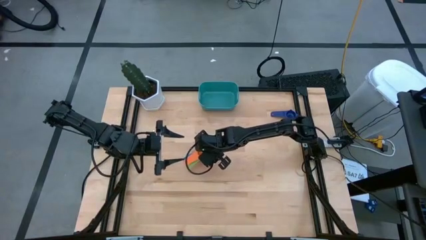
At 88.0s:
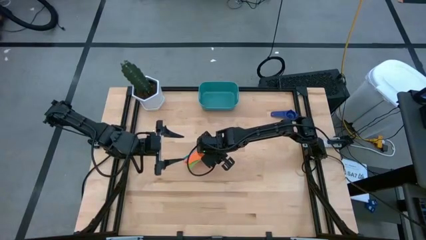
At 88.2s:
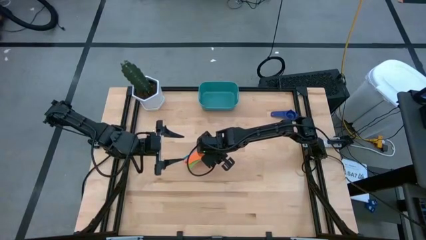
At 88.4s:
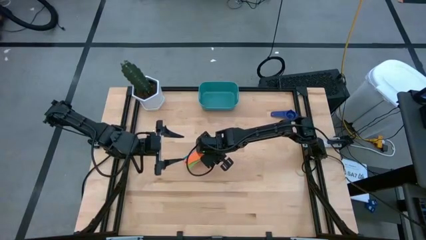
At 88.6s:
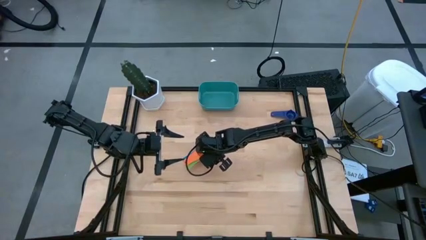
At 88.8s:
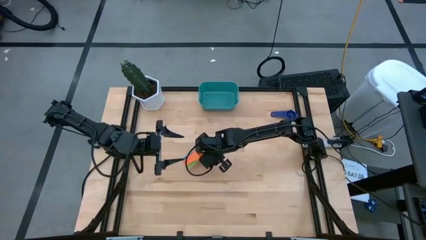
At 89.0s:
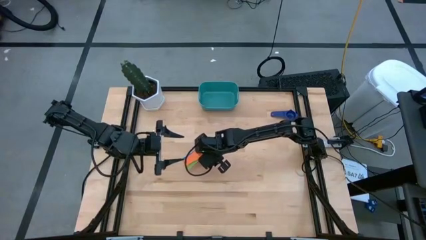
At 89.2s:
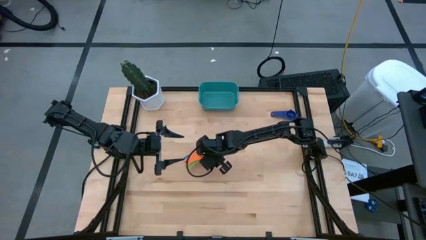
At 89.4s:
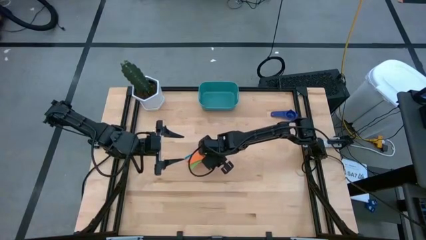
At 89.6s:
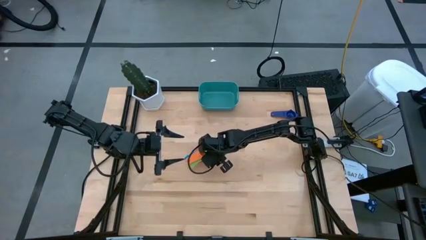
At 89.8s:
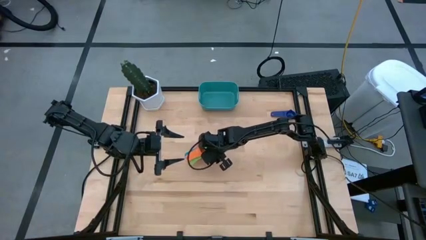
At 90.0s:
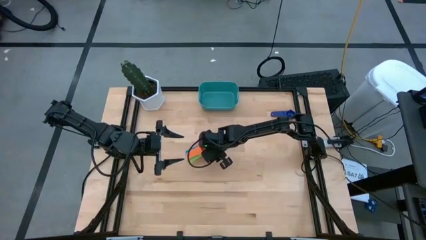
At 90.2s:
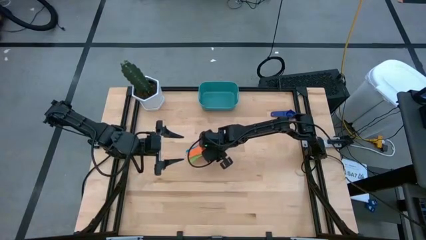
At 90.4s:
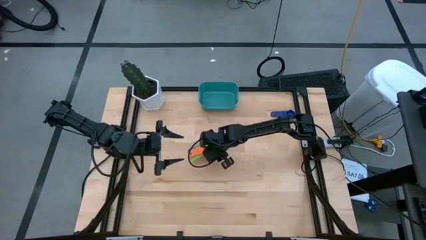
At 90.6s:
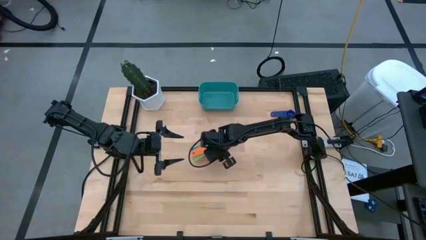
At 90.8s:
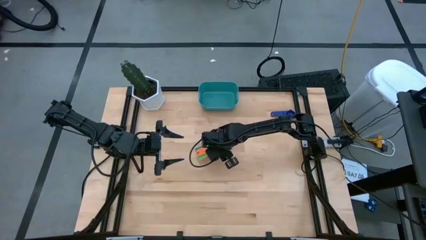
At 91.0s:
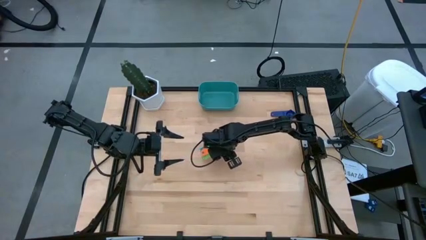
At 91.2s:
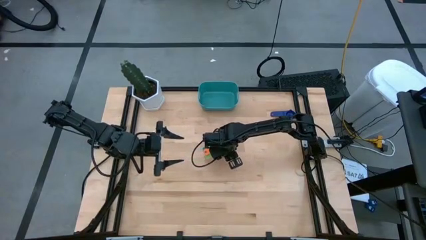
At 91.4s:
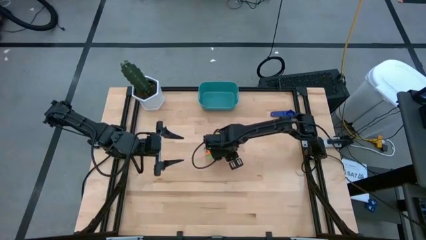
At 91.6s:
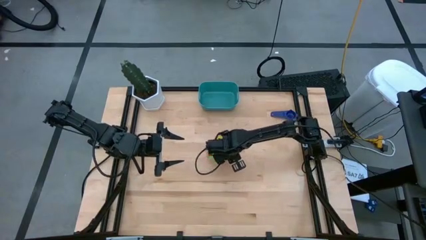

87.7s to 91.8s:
Task: Nest measuring cups in basket
Move the stacked measuring cups slightly right on the table

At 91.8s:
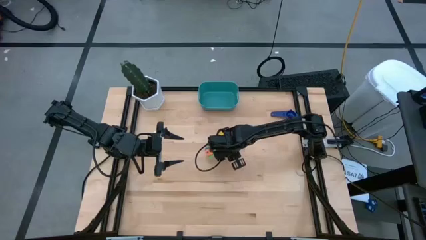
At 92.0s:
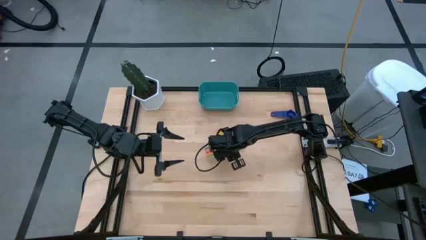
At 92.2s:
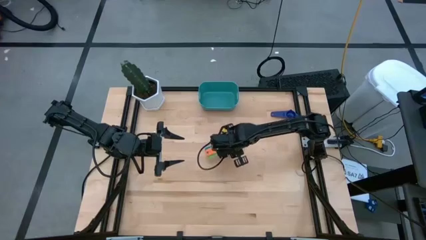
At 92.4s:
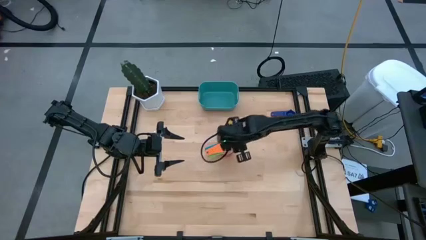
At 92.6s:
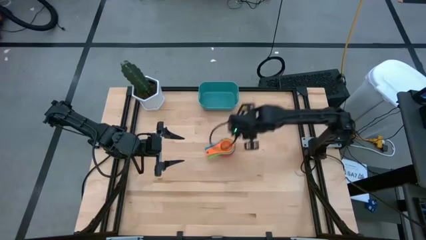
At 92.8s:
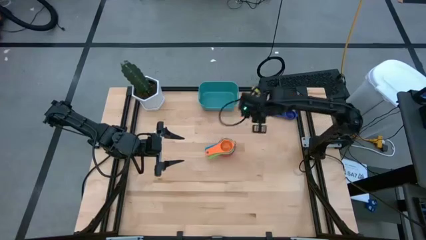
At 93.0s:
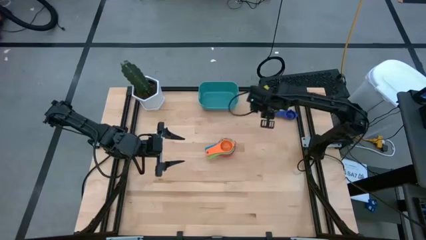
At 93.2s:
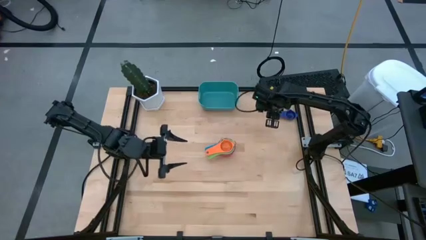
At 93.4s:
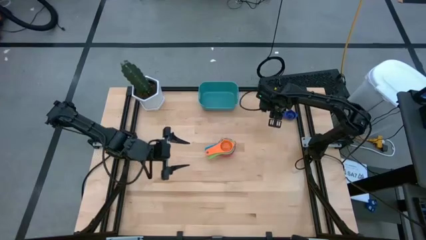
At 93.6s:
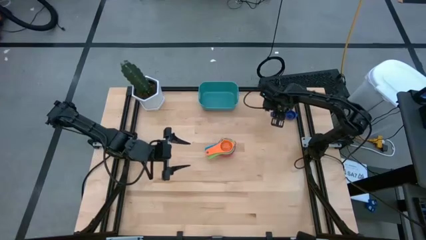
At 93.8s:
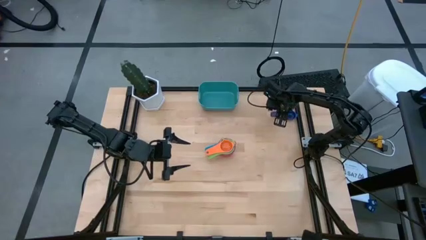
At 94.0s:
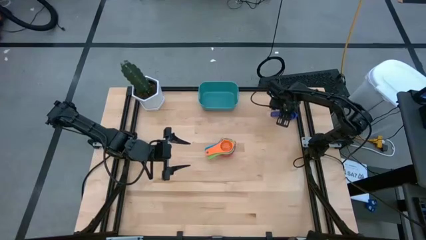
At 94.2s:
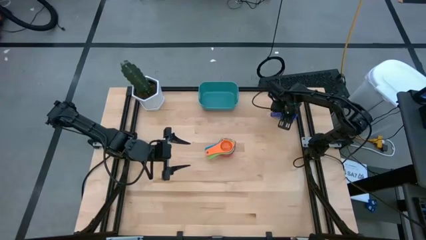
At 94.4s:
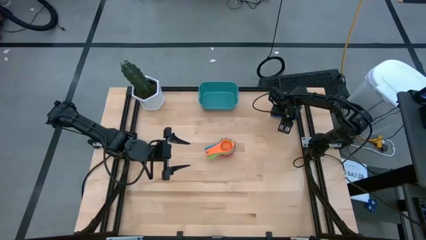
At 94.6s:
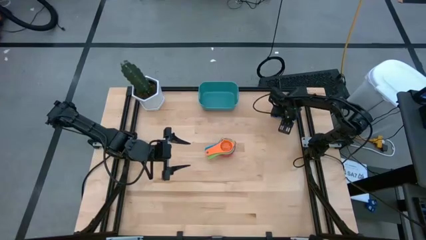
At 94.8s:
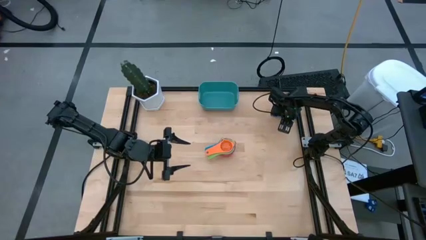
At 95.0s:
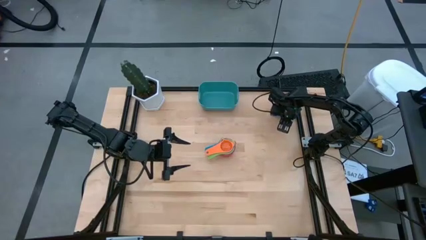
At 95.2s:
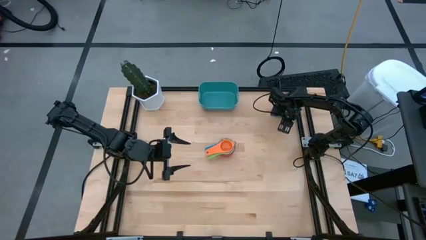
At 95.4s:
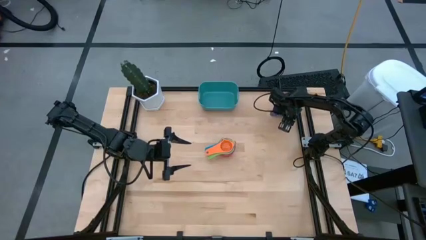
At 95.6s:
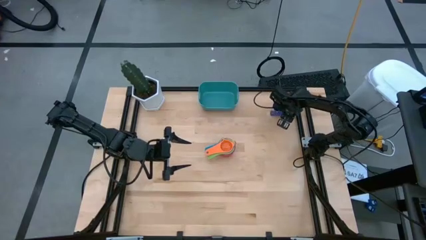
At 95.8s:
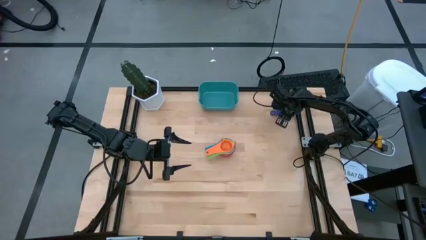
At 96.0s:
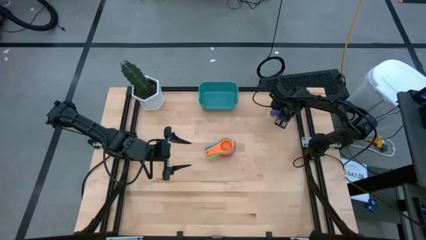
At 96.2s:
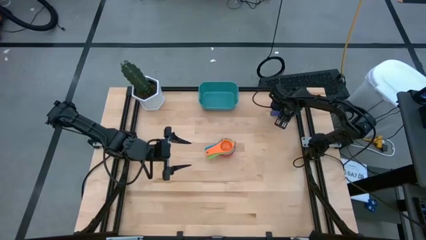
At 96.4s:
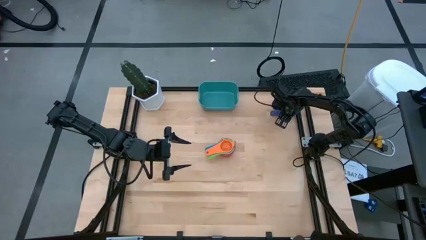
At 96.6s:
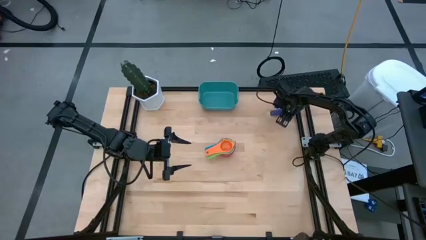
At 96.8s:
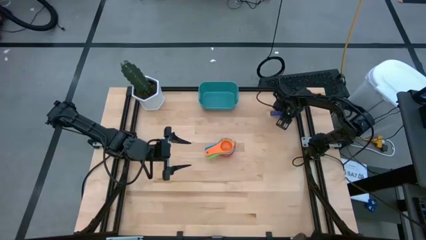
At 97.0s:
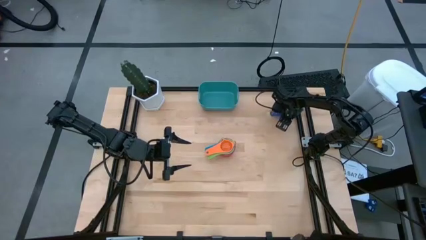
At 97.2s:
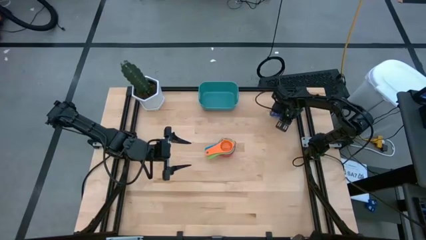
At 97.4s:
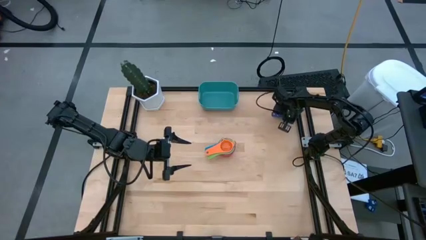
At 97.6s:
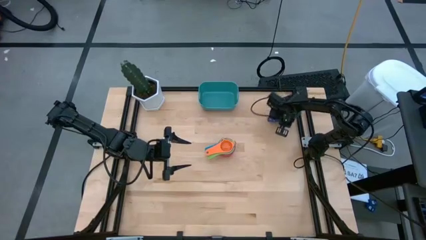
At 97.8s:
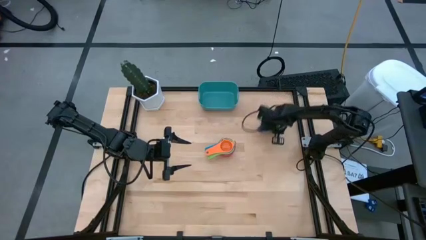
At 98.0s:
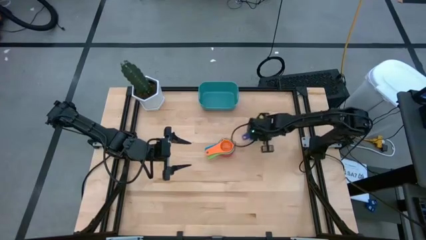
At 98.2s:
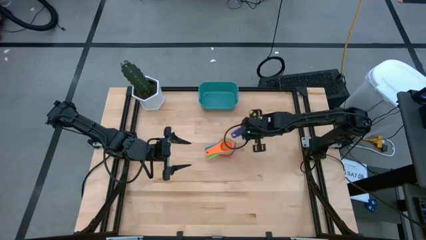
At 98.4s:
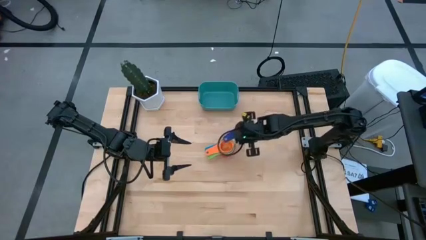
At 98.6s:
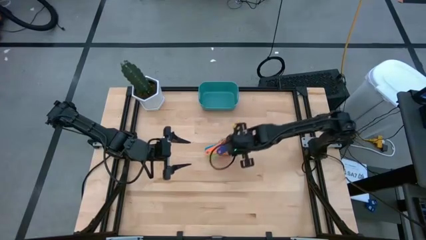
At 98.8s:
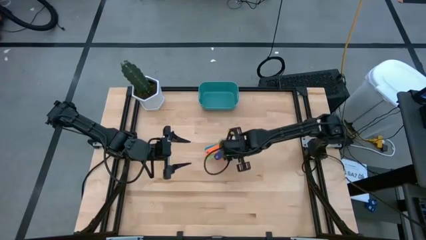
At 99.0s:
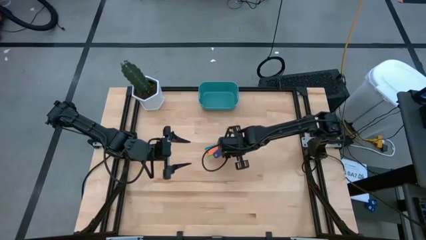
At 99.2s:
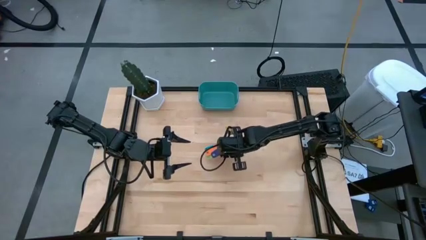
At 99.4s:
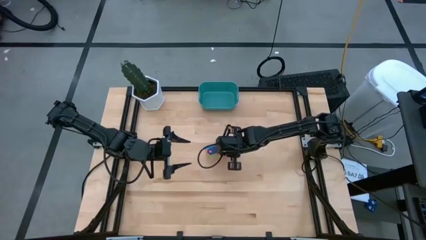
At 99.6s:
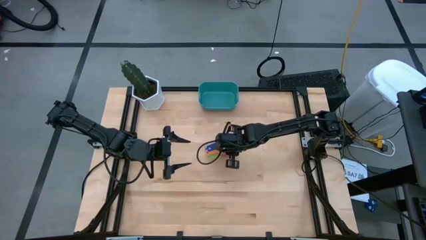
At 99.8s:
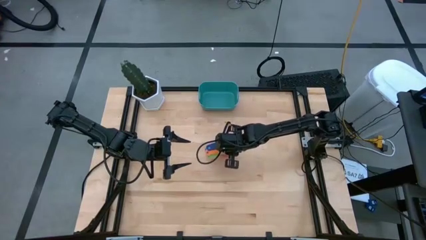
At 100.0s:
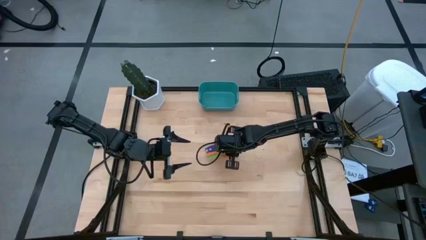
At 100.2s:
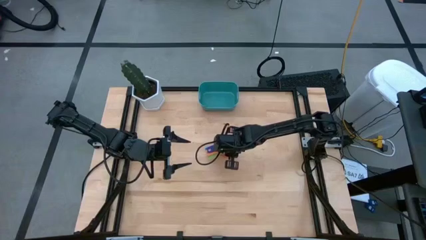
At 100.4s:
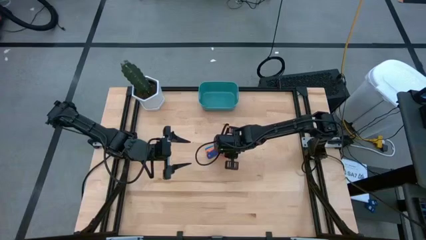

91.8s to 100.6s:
Stack the dark blue measuring cup on the orange measuring cup

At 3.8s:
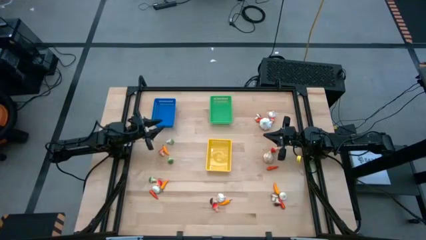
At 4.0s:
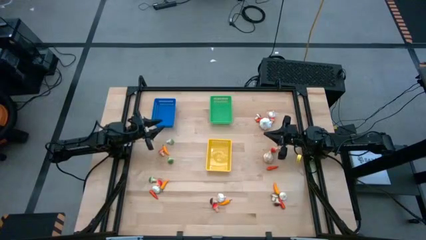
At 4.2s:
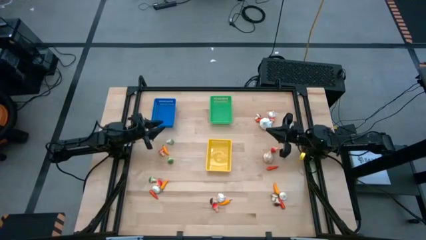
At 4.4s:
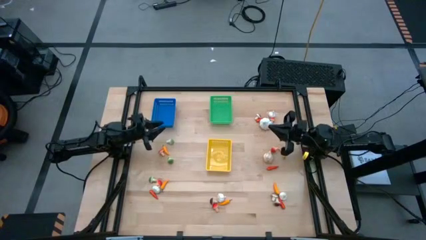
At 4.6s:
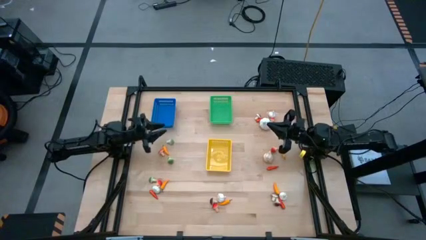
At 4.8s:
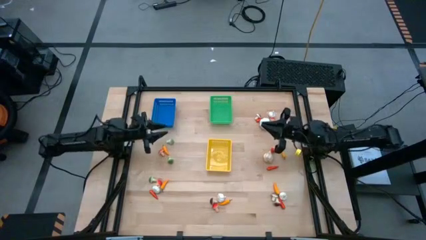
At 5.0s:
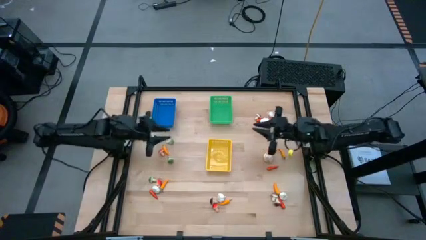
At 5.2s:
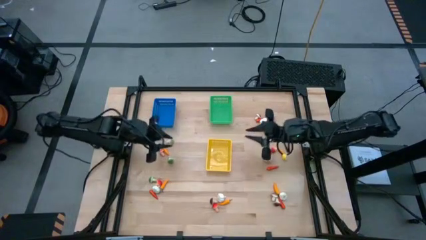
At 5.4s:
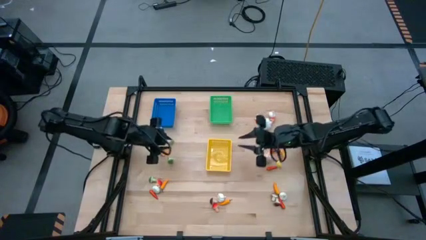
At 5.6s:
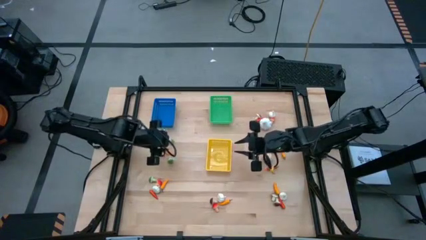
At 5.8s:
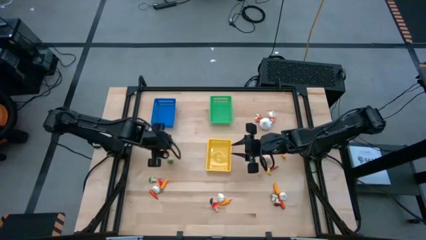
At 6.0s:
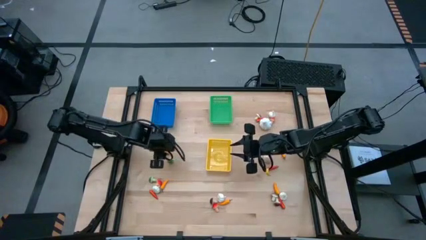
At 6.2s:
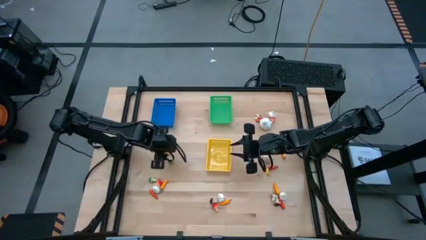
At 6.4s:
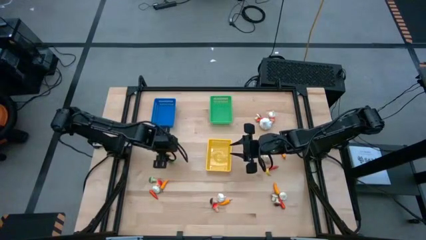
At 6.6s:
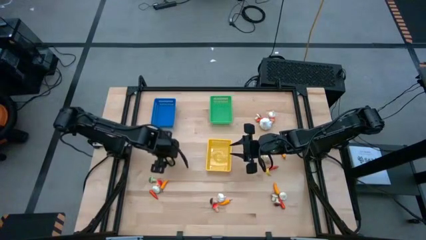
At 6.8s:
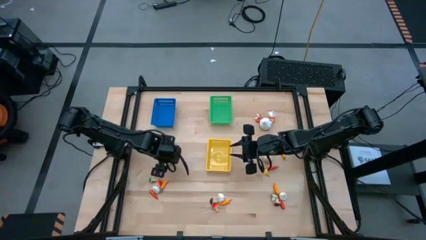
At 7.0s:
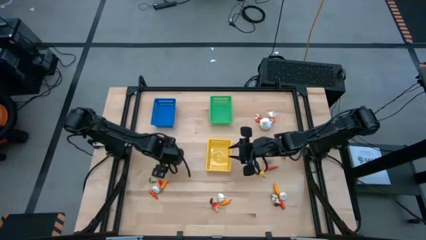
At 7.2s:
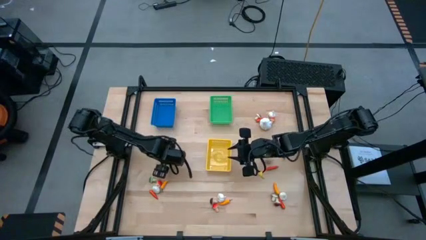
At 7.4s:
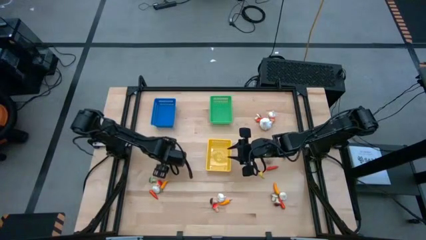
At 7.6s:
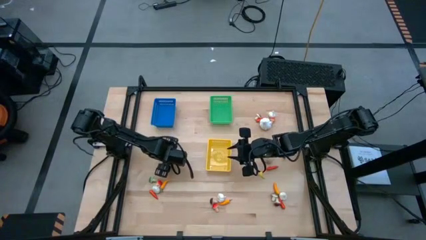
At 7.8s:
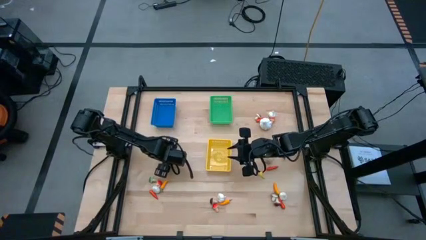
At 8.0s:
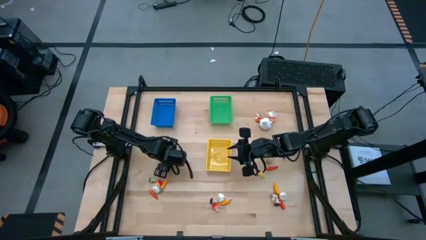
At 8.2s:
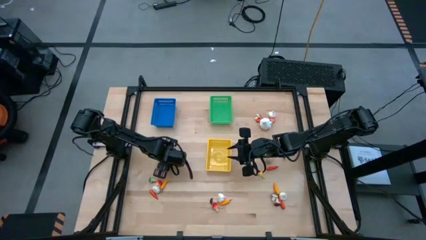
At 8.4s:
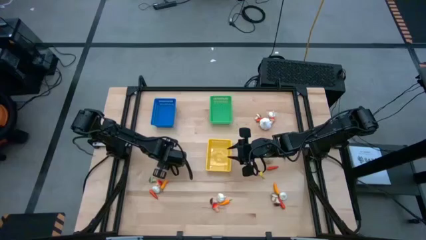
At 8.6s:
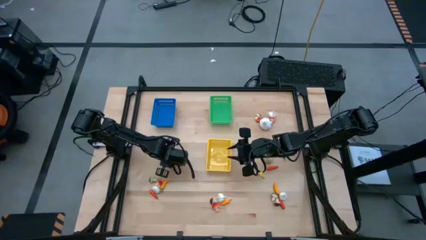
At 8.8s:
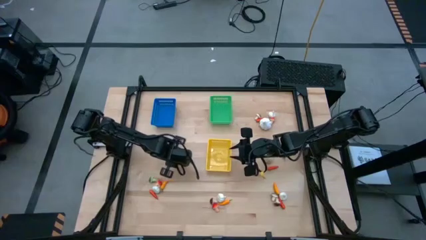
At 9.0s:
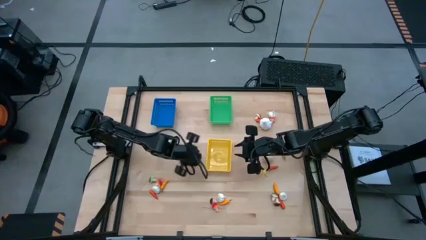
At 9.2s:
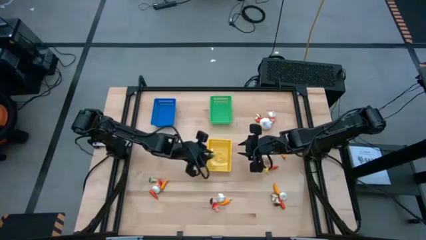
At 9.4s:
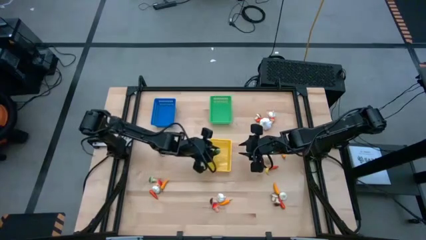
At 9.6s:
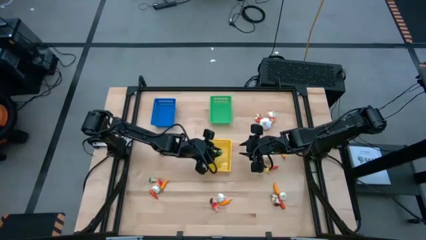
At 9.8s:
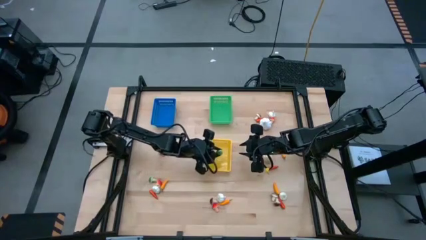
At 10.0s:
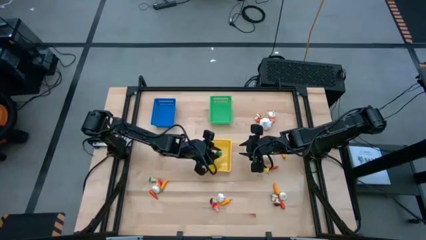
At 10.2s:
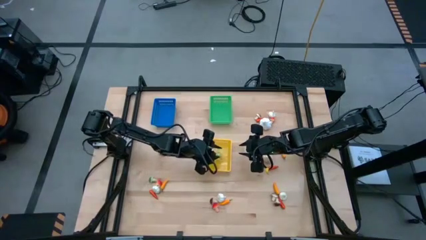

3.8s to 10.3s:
Task: Sort produce into baskets
Put the green mushroom into the yellow bin
